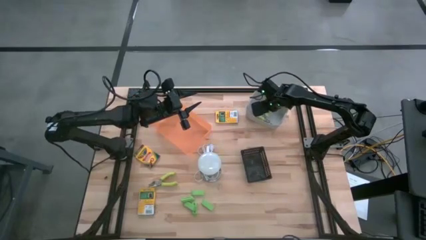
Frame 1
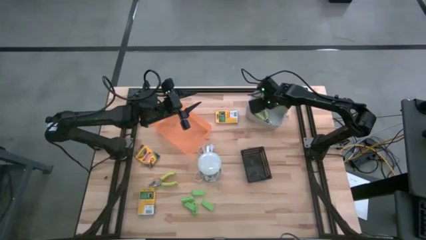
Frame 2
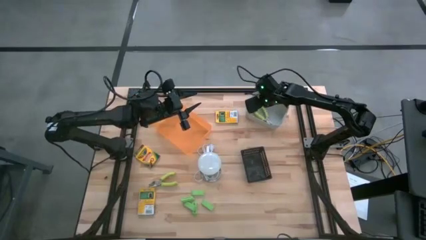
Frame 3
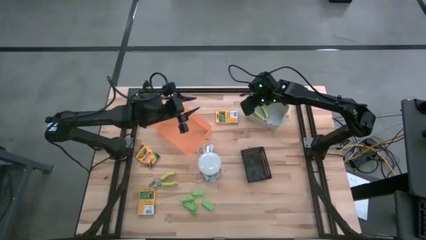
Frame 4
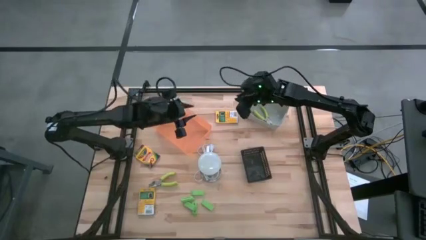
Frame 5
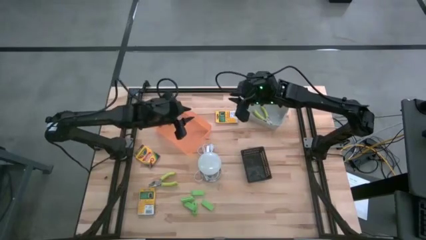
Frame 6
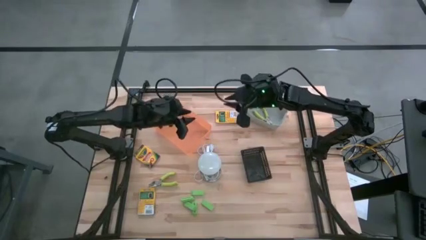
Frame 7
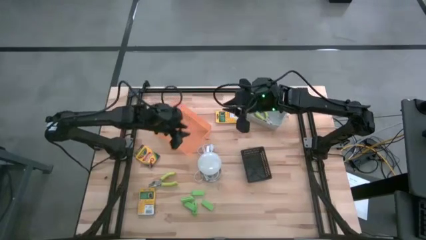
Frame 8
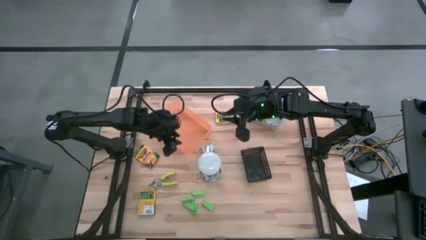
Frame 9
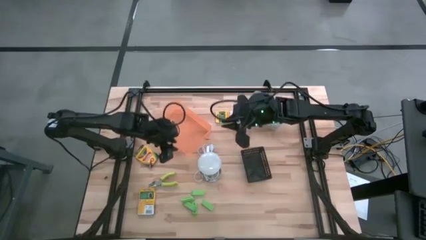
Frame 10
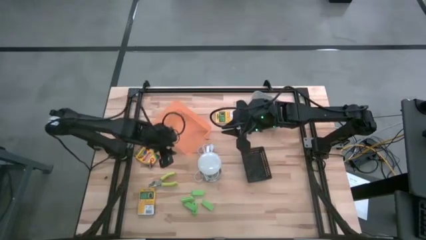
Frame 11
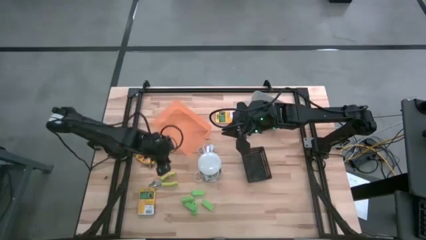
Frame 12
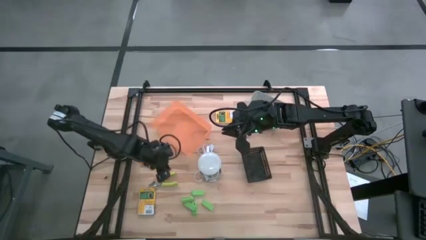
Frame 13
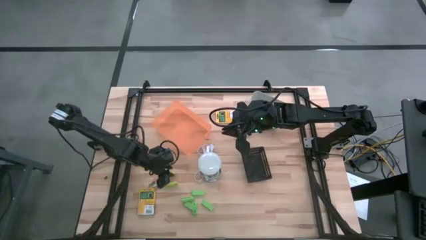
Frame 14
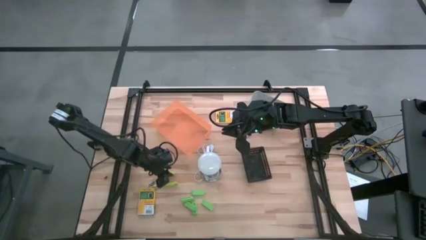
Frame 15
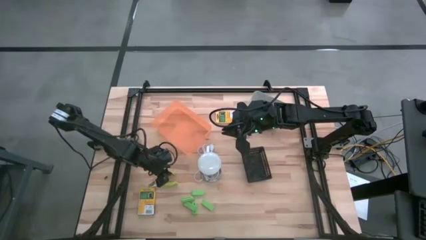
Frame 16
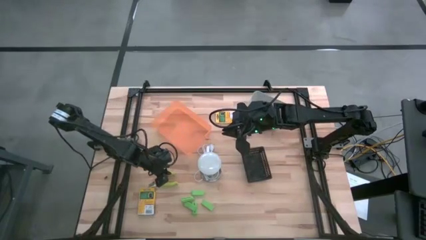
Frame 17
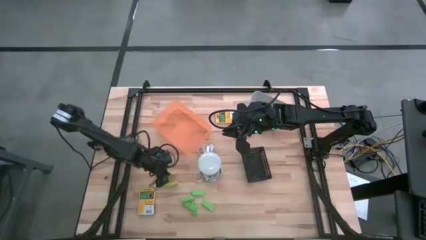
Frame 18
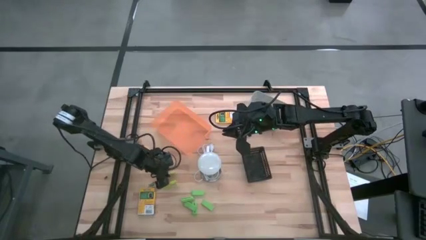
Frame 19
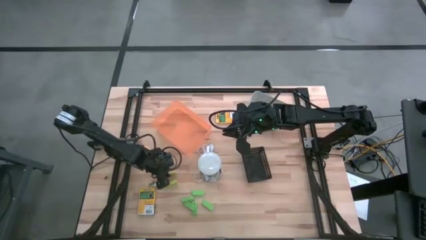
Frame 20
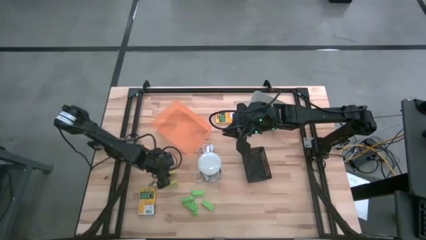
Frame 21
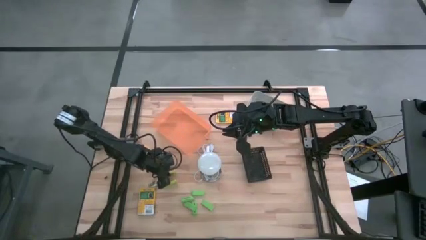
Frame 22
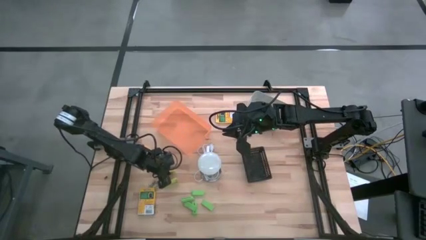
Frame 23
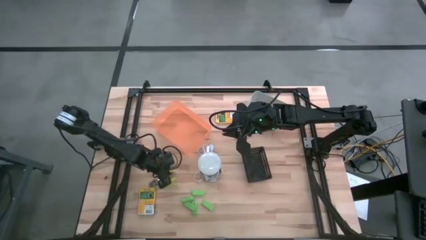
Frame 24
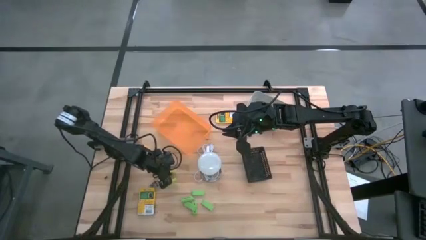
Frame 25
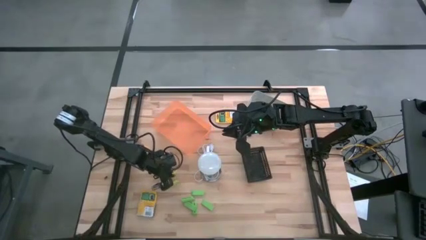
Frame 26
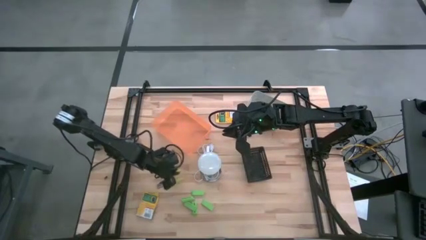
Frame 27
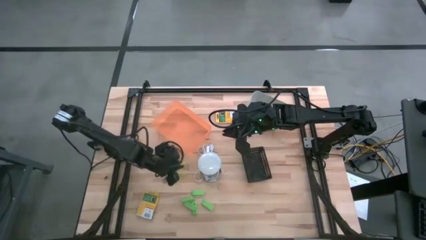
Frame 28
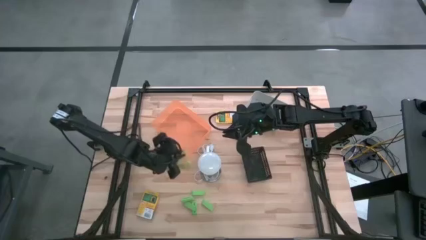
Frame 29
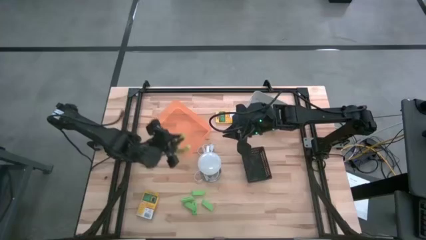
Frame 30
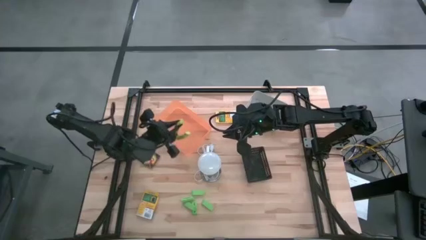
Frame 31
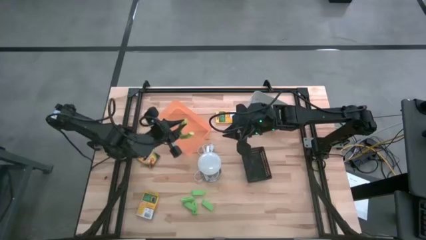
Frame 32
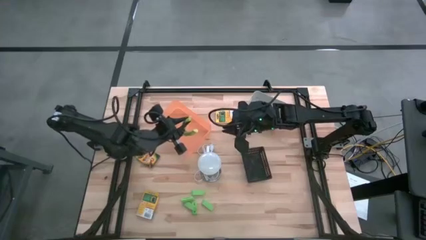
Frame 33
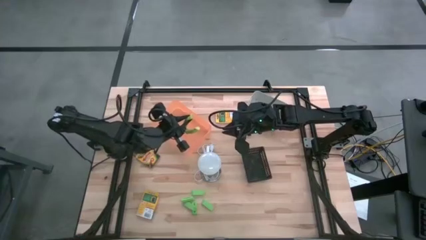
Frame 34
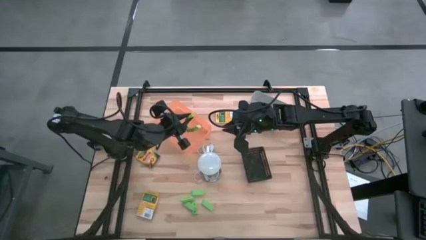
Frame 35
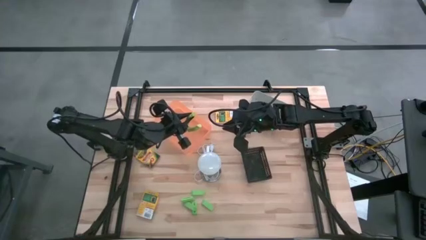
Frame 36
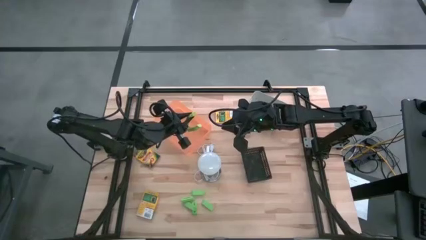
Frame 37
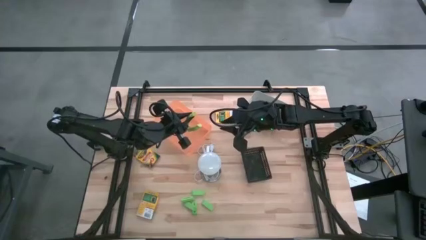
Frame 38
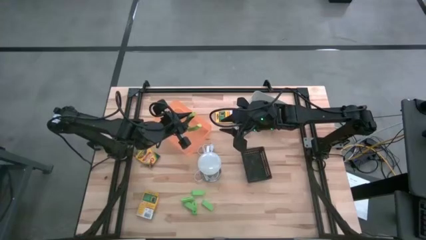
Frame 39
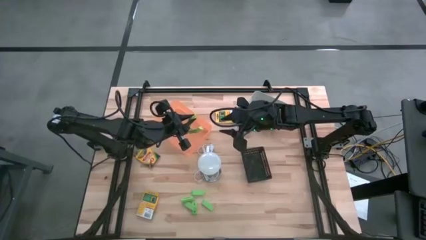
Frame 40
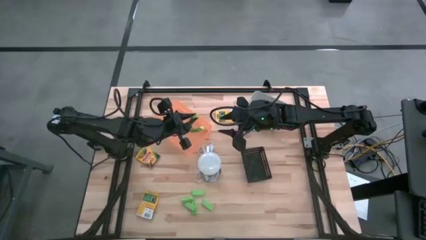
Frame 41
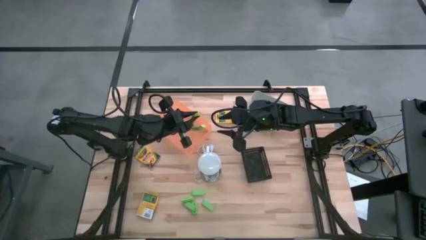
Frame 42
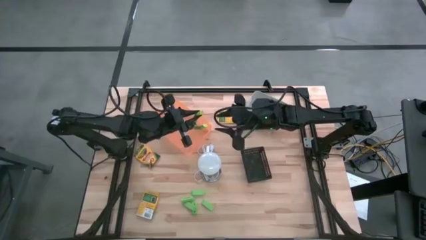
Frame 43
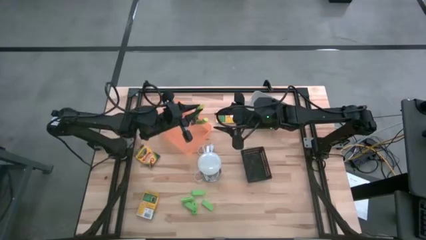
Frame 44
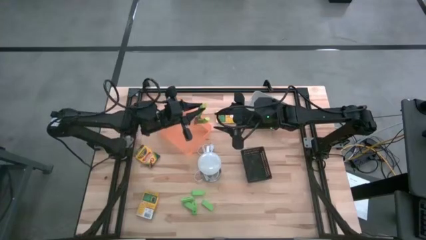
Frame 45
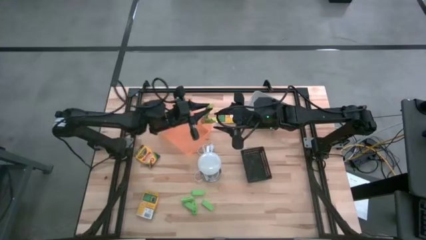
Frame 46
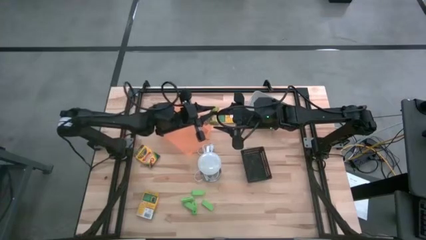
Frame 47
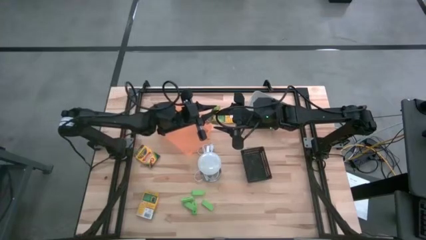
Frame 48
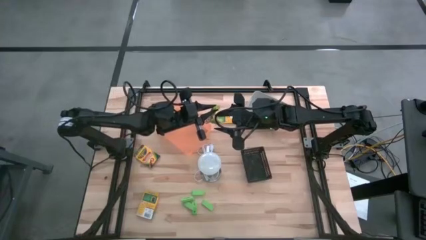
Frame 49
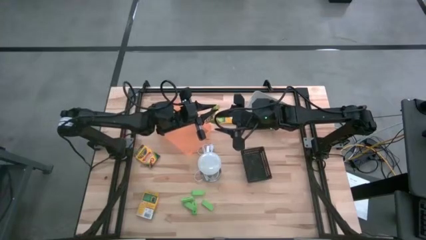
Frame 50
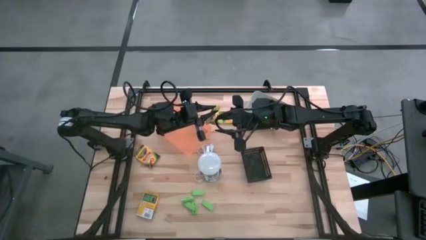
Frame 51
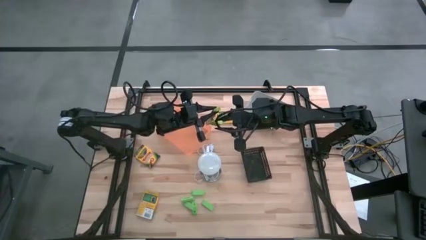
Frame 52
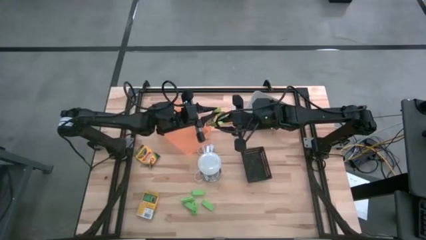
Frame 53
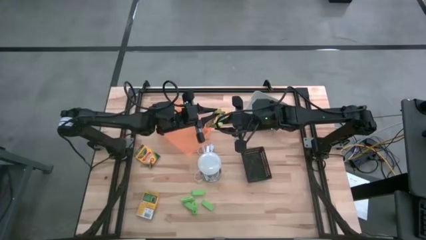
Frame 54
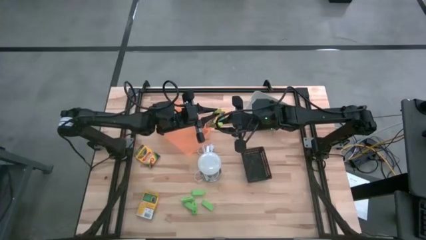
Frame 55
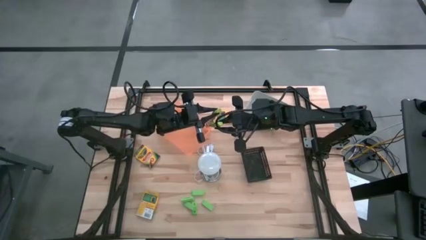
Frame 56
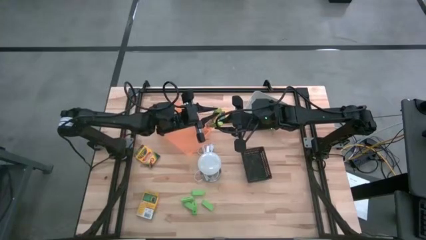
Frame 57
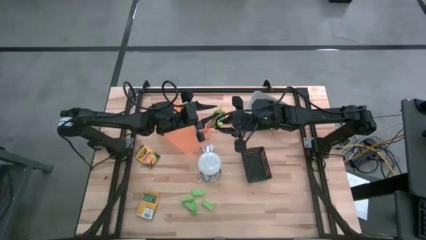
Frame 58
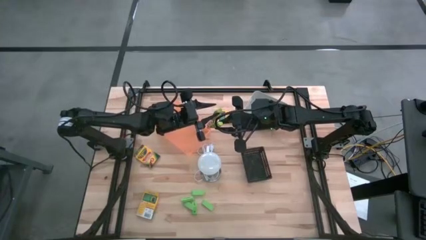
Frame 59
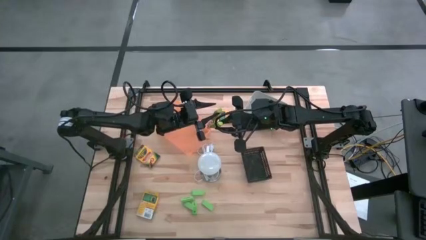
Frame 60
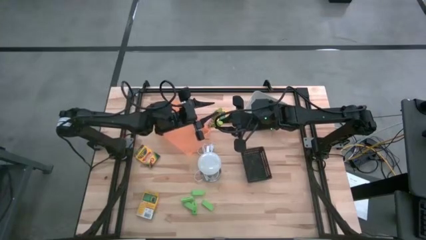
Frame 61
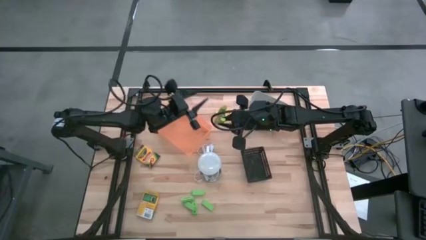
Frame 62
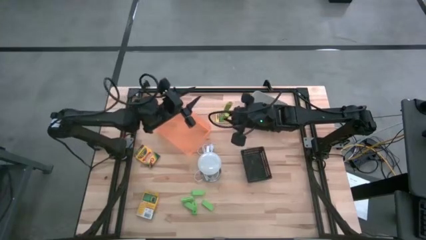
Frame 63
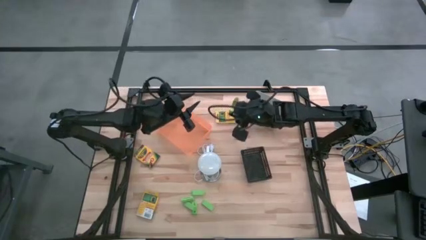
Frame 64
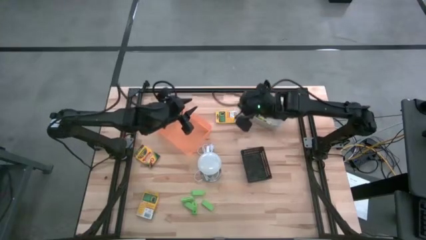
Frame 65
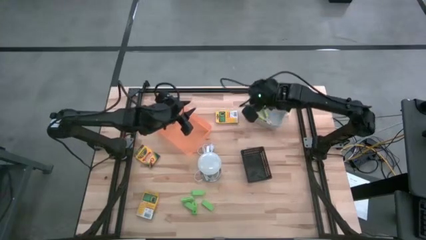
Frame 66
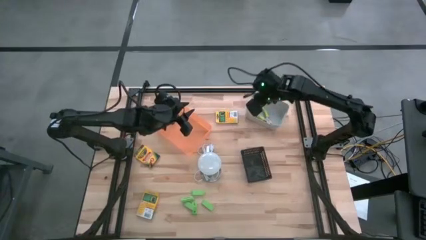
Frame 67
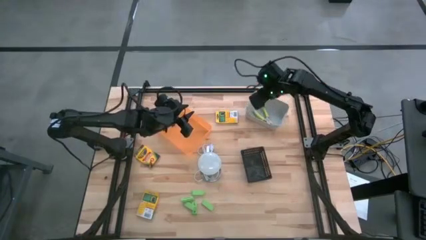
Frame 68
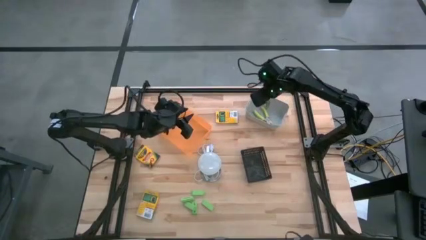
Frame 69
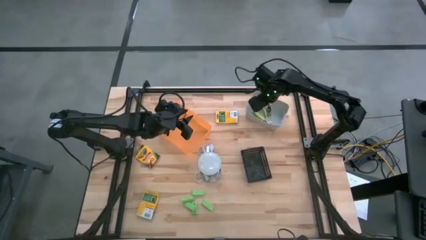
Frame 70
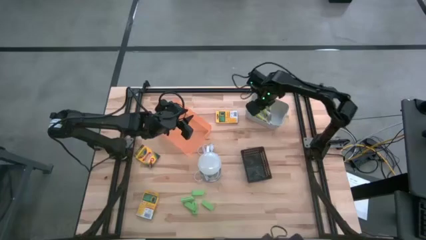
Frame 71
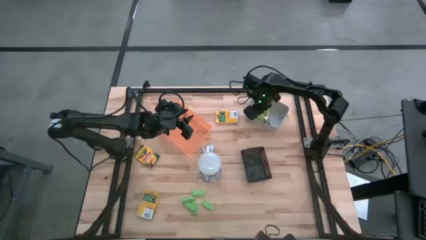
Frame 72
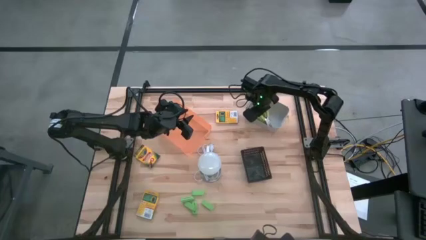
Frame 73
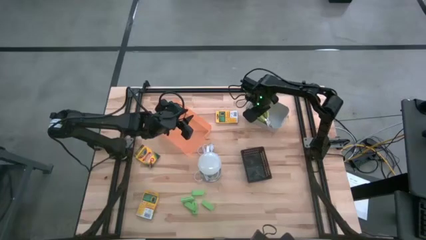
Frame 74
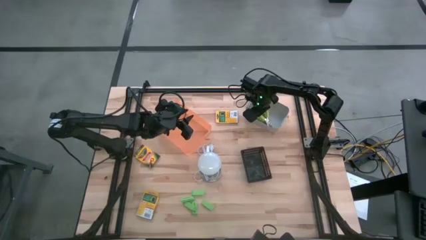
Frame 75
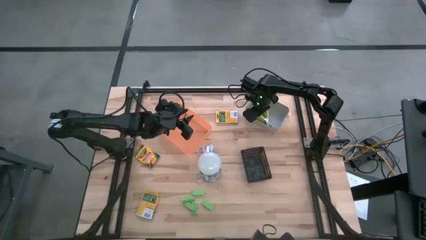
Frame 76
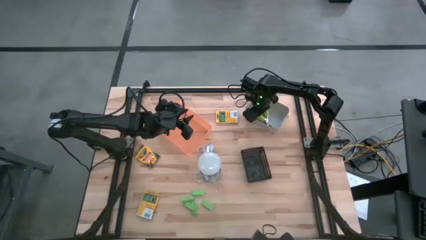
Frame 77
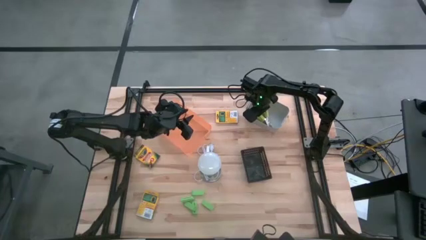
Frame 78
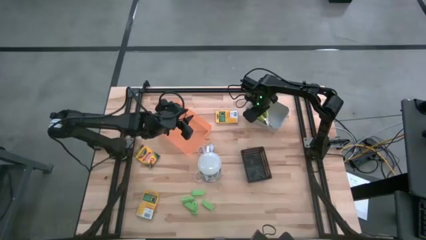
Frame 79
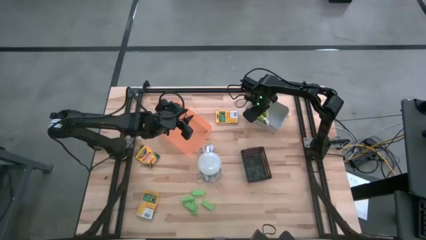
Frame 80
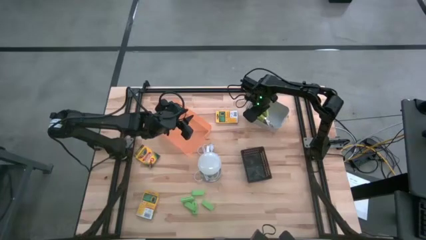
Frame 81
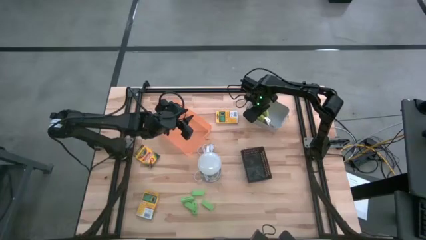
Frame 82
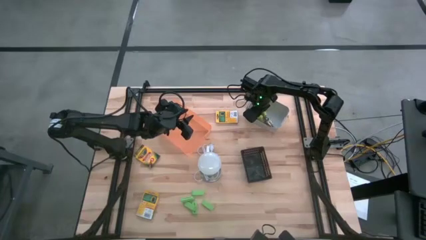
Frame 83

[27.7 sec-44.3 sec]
Task: Pick & Place School Supplies
Put the green punch plier into the gray bin
